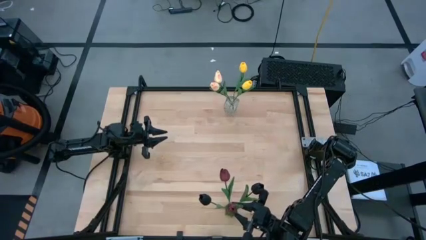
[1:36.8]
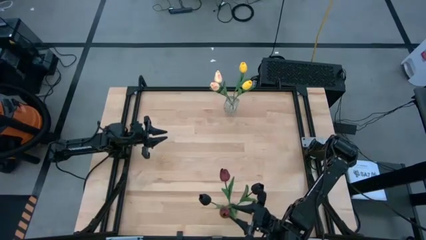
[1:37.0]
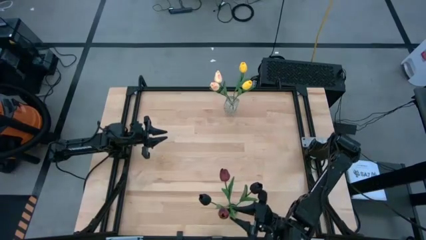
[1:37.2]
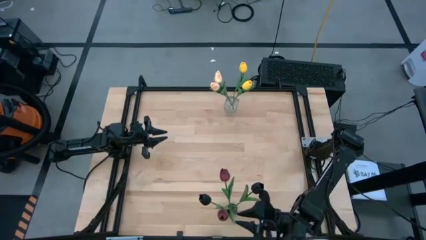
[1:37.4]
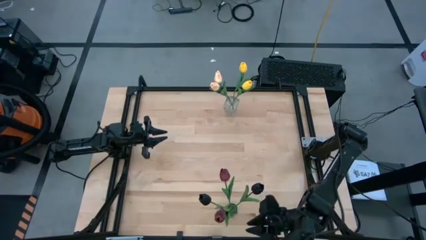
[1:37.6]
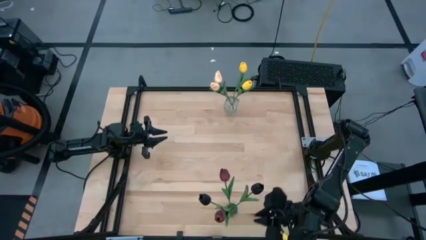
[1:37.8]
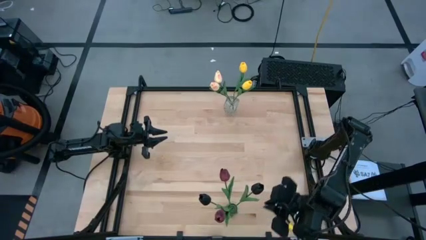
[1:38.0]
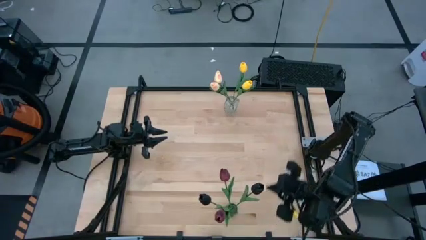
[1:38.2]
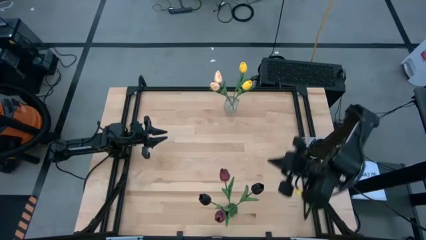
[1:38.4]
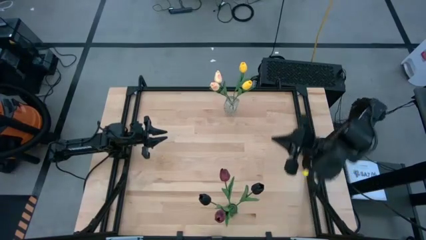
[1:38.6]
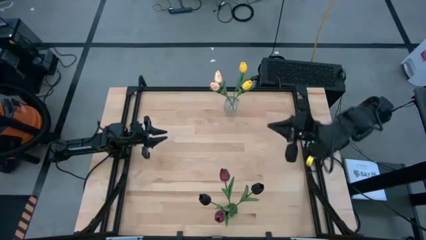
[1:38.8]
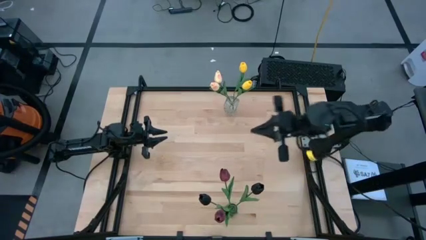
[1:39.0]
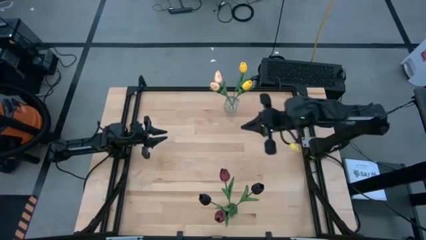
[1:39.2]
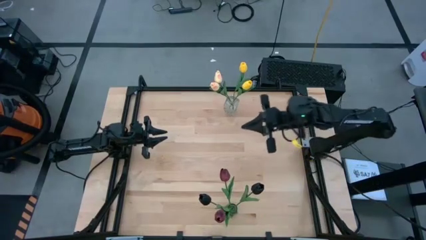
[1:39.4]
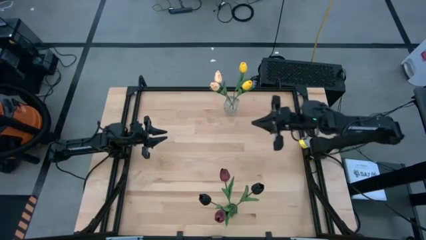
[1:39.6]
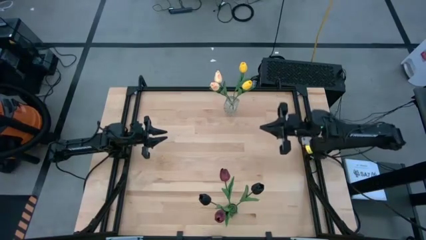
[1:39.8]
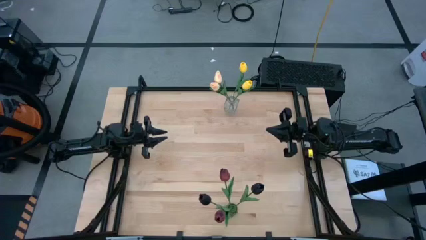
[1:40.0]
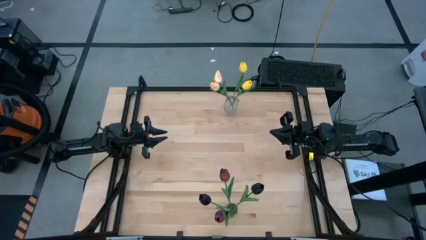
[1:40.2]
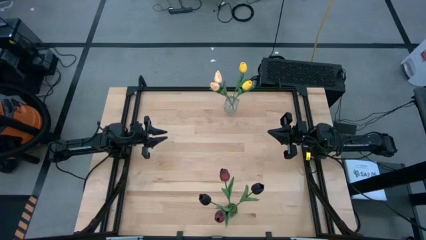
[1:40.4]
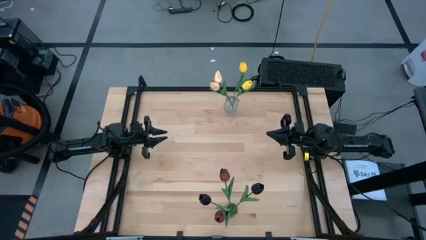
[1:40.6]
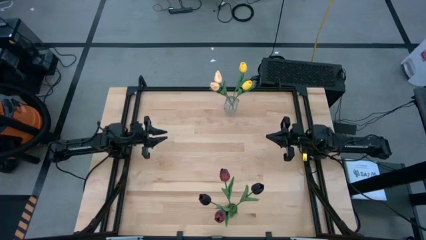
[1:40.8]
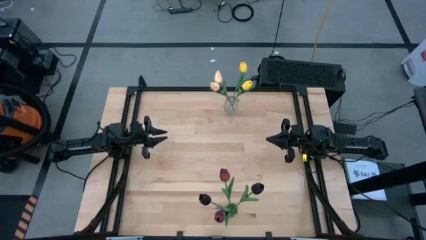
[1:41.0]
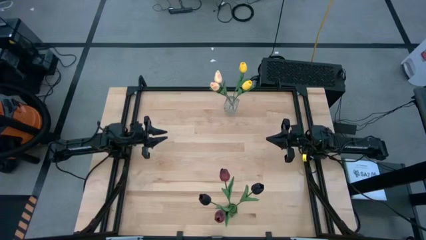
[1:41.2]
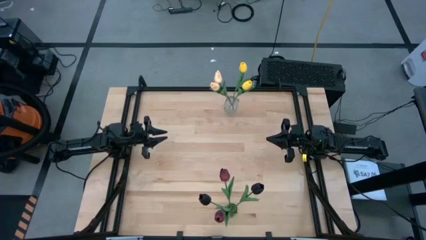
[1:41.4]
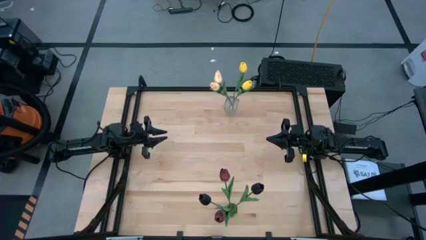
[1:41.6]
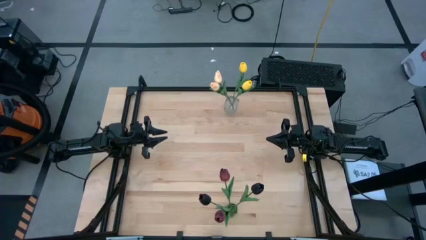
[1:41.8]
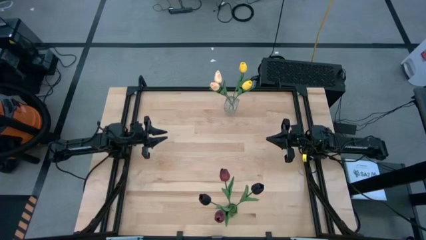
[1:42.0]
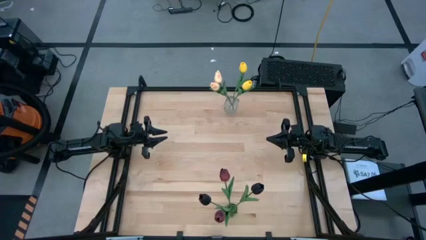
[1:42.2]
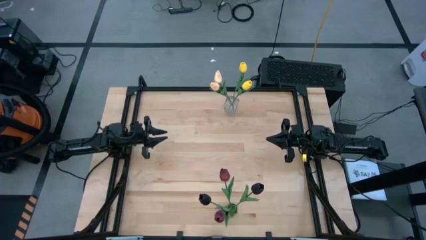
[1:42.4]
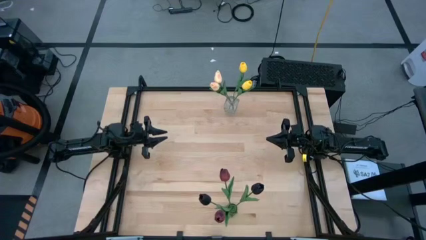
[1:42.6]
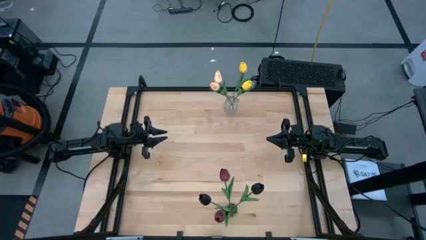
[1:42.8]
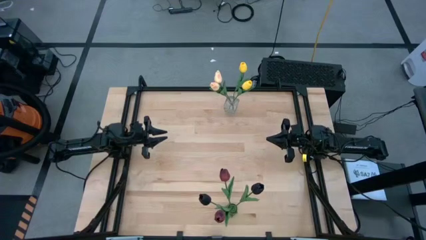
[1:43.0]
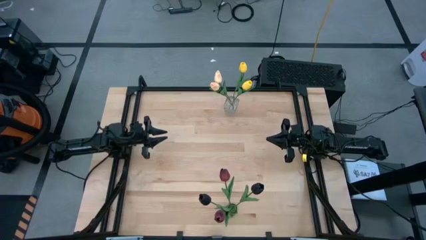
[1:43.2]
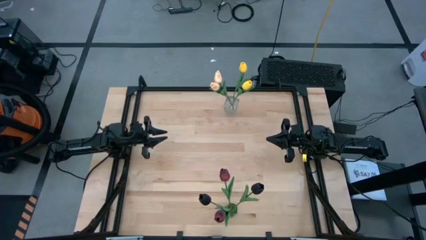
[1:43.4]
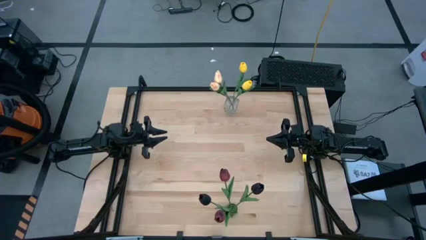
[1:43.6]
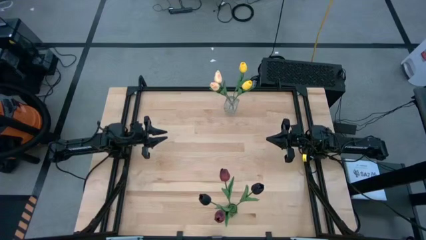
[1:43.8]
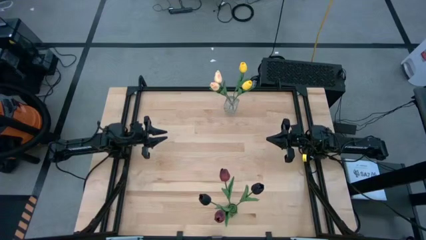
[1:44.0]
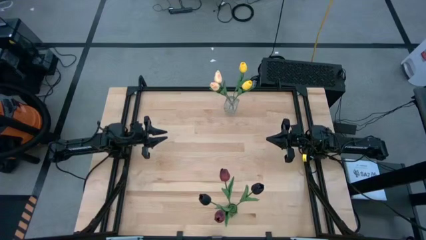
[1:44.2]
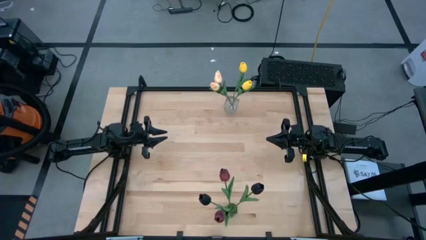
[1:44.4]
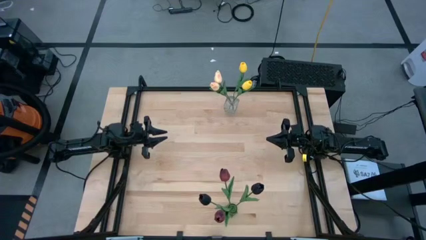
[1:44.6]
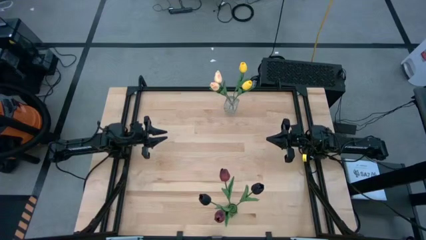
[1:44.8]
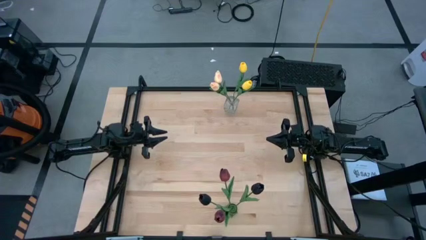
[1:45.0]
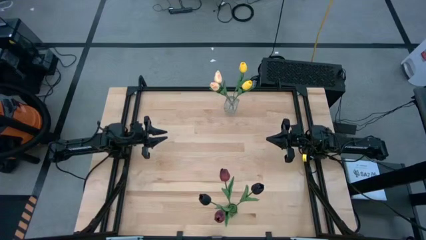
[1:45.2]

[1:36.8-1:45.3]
Task: Sort flowers into vase by color
Return to Home Position

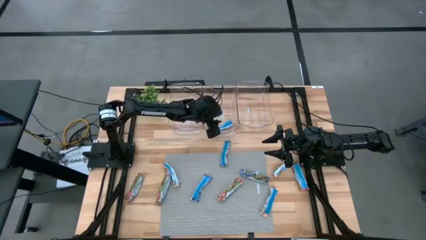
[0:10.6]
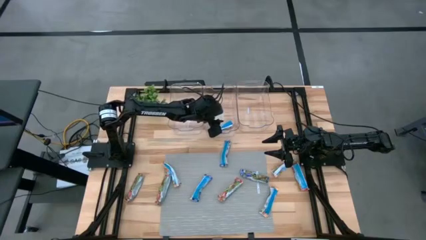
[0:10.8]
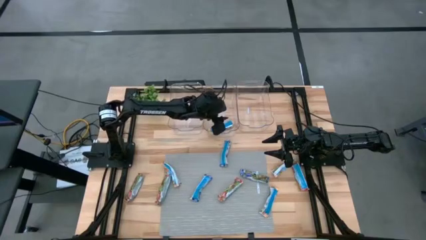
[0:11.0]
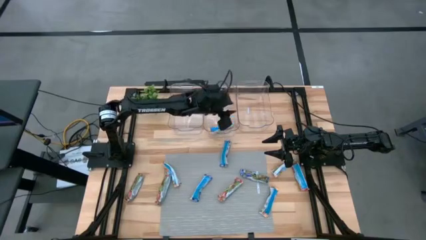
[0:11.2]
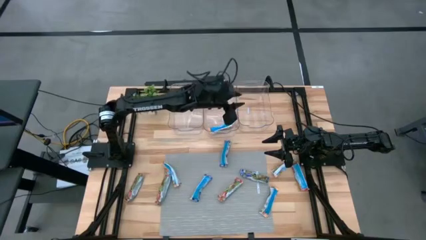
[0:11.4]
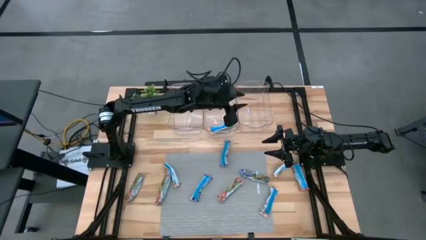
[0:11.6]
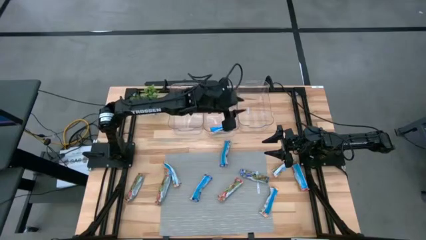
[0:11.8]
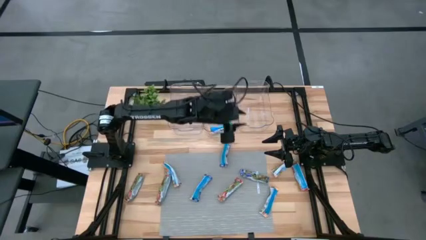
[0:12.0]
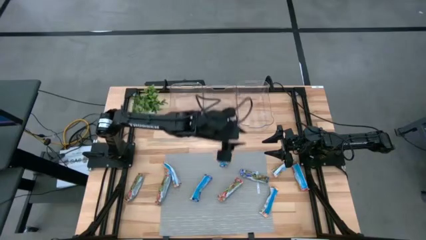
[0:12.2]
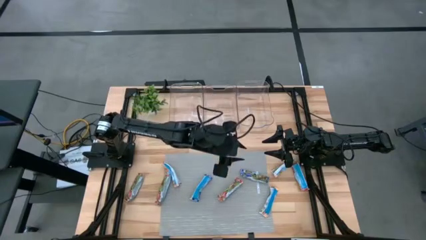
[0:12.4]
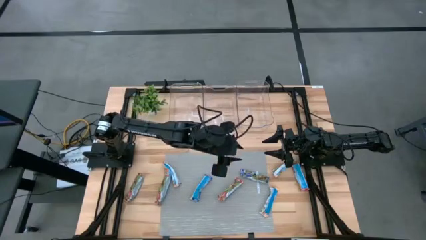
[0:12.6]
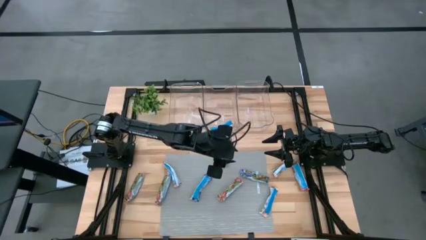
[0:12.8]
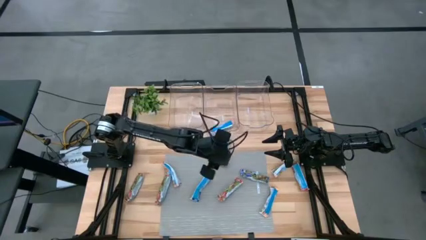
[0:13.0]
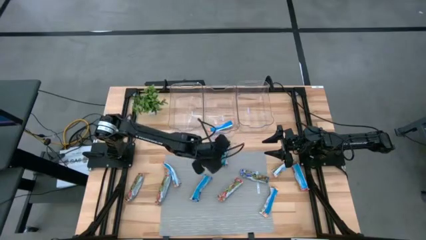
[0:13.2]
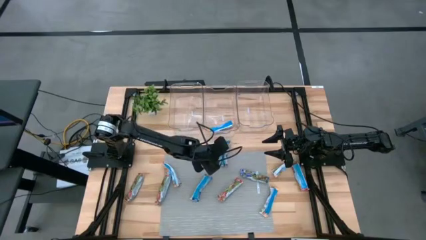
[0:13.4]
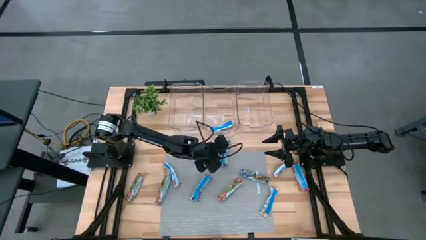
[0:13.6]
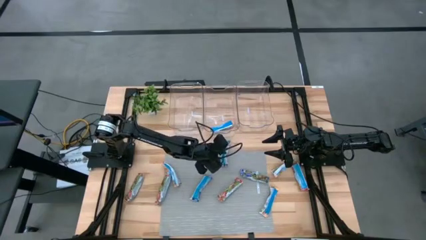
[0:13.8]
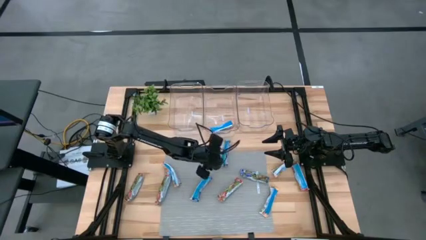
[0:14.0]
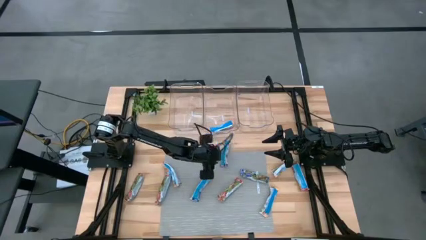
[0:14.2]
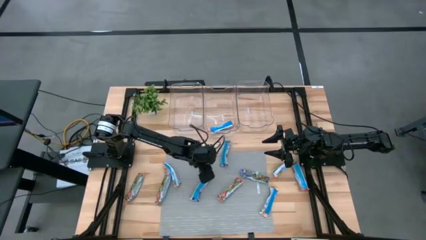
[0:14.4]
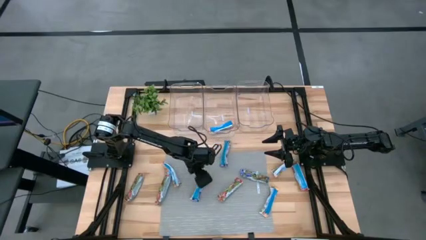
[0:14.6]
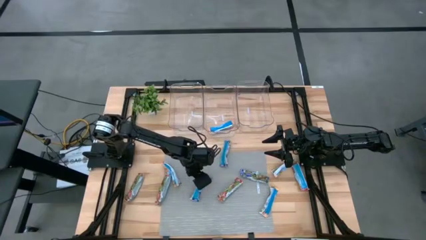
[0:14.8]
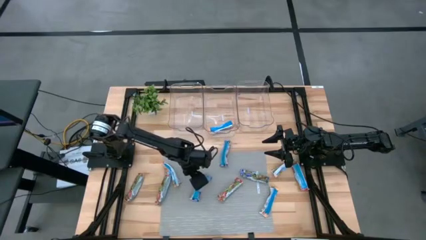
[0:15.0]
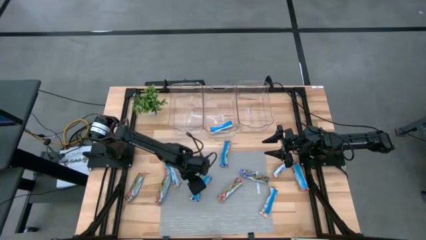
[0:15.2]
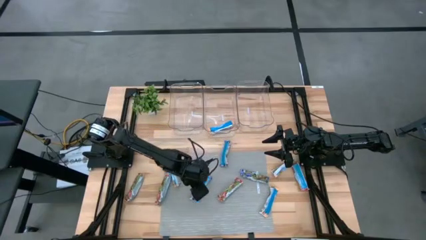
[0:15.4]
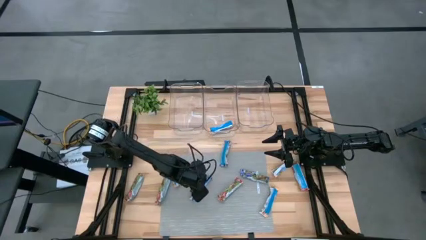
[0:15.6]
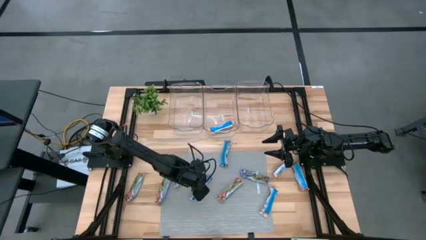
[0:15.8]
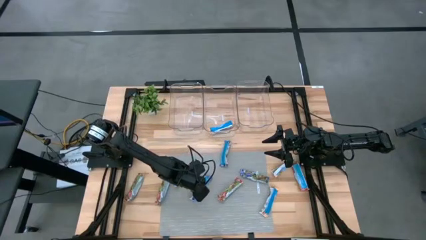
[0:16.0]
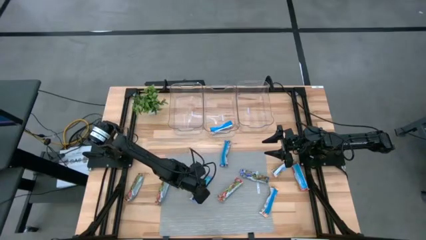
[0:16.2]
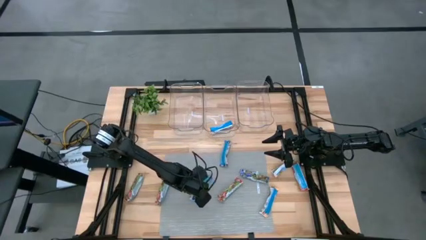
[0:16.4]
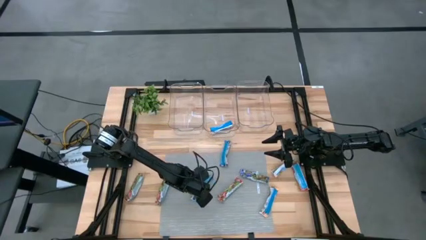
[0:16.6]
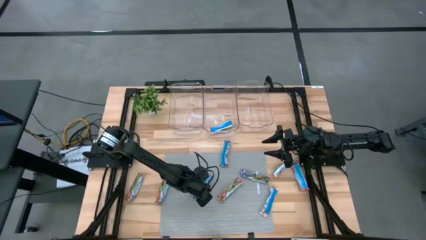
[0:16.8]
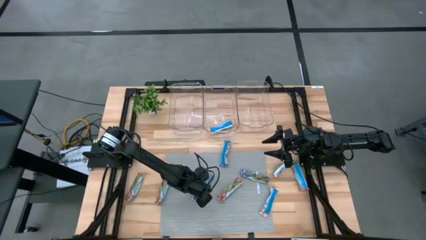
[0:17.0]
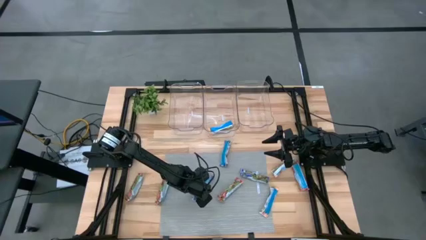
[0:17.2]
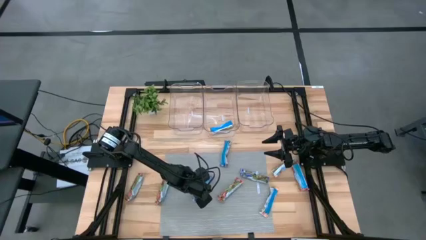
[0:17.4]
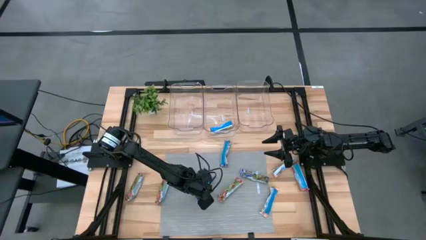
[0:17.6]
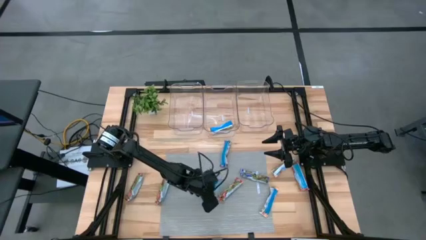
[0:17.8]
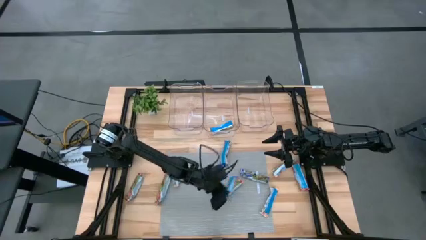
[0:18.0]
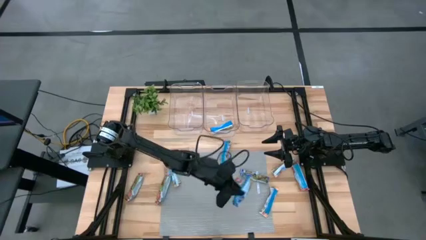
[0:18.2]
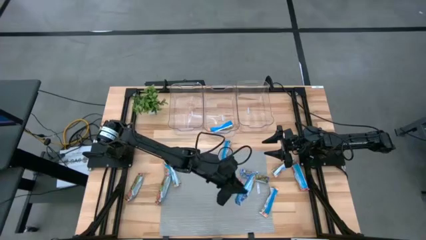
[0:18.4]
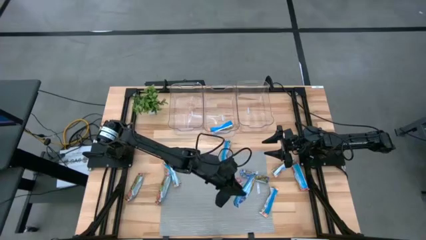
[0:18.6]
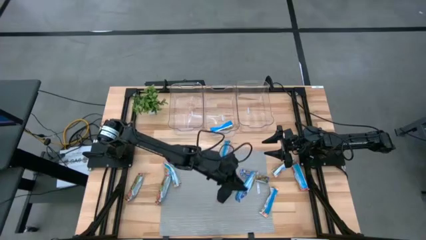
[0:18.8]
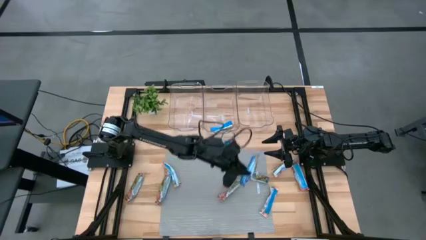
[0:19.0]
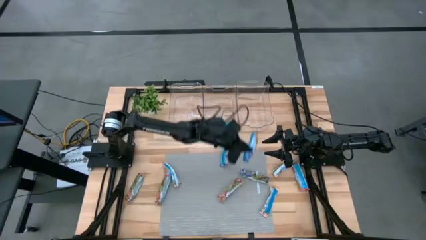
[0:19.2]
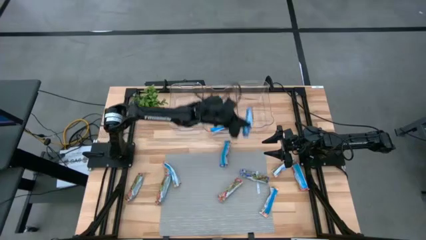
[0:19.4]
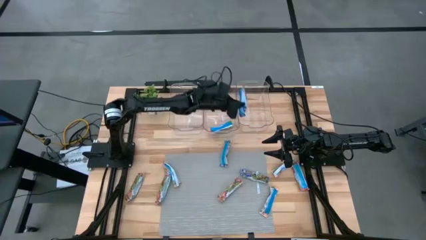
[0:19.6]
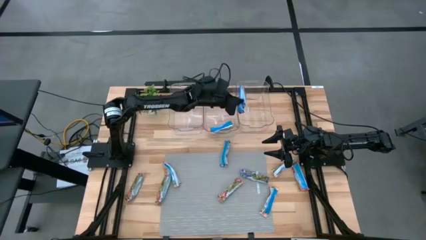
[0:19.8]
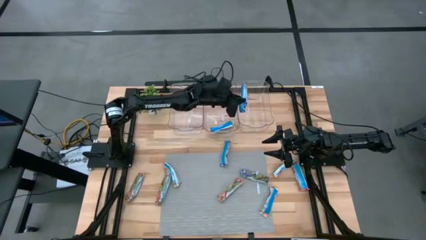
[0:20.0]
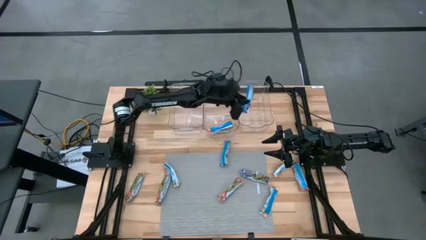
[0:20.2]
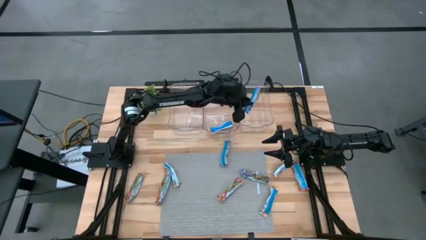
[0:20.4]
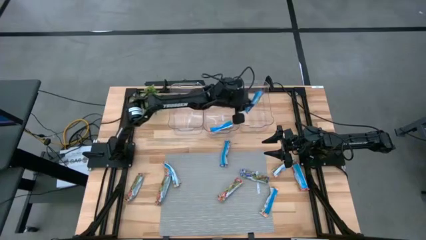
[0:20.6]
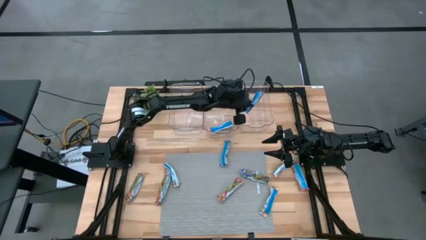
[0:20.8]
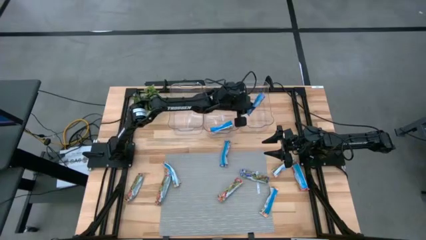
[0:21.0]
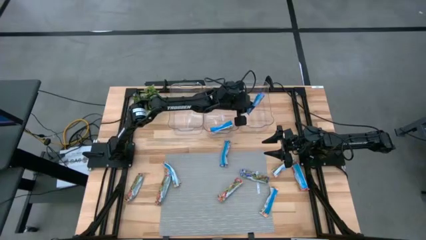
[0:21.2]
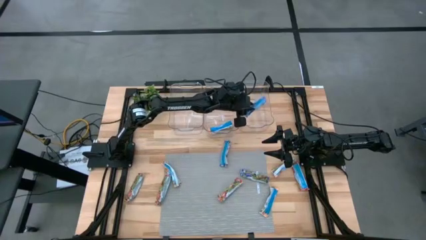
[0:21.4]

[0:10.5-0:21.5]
Task: Pick and place Granola Bars by type
Put the blue granola bar into the right transparent bin
